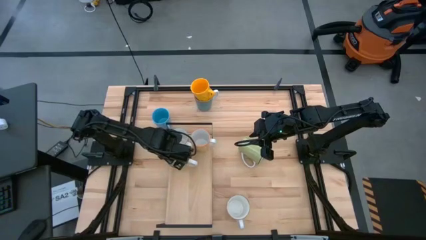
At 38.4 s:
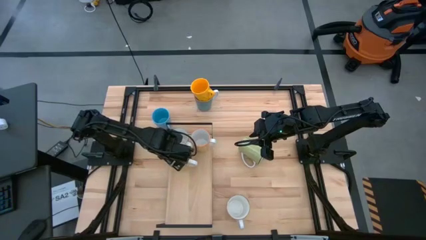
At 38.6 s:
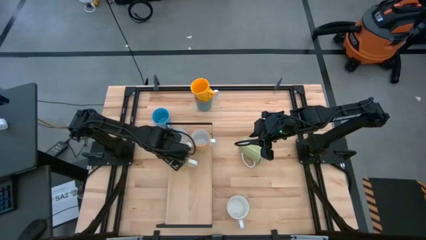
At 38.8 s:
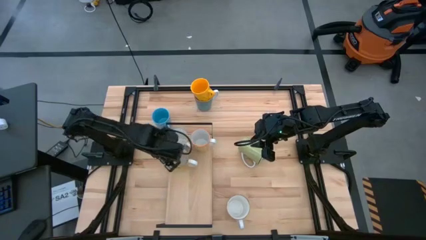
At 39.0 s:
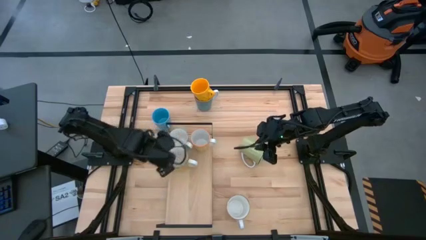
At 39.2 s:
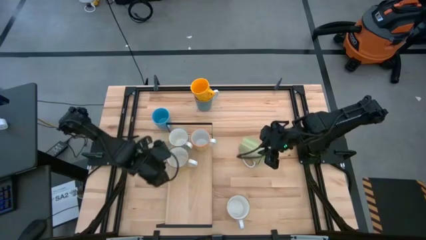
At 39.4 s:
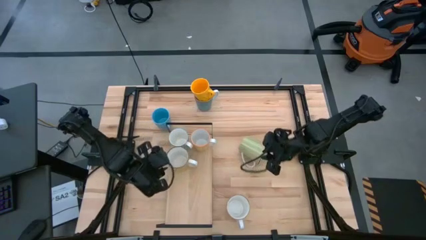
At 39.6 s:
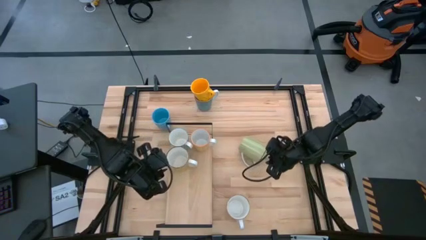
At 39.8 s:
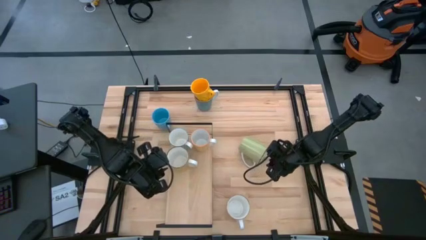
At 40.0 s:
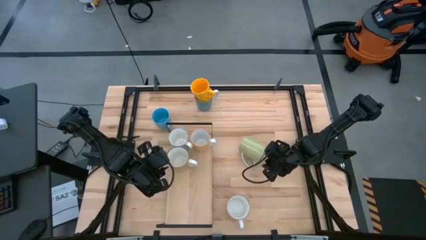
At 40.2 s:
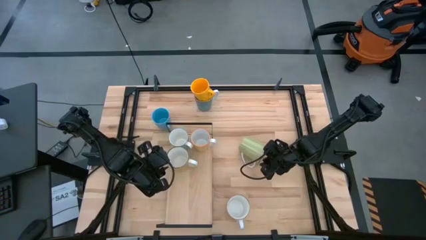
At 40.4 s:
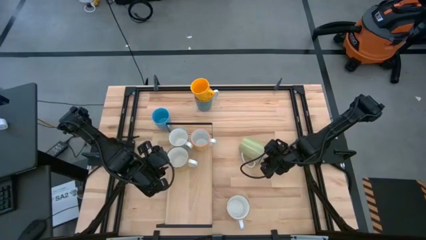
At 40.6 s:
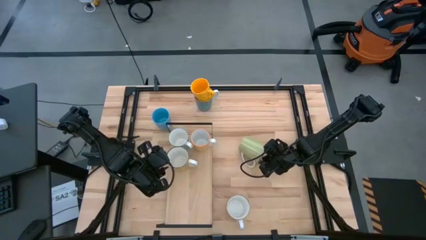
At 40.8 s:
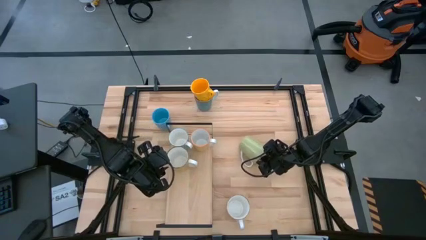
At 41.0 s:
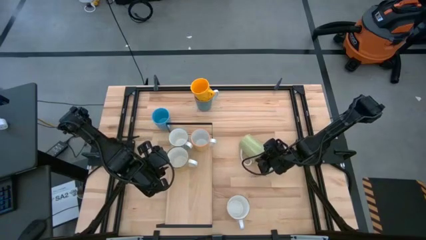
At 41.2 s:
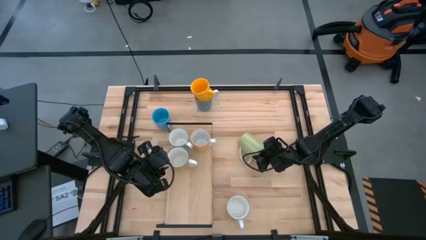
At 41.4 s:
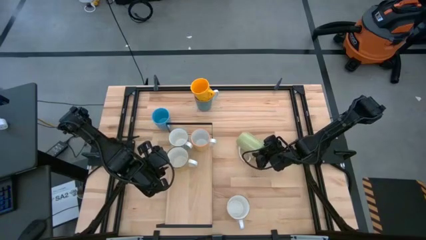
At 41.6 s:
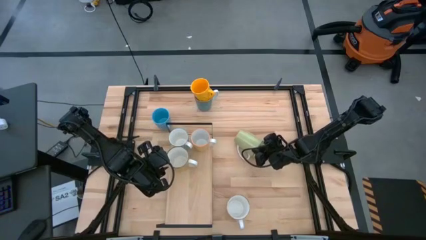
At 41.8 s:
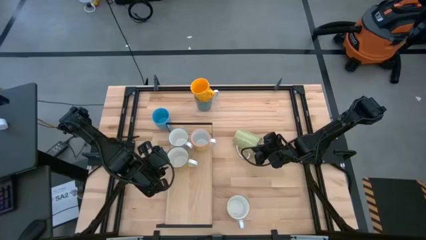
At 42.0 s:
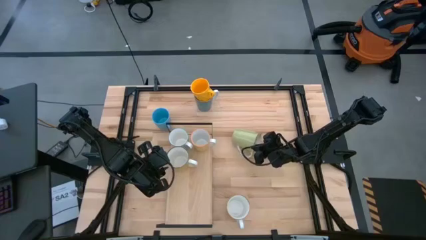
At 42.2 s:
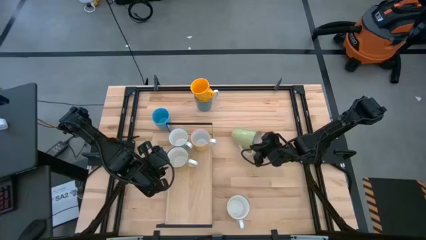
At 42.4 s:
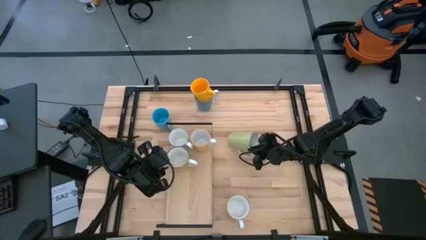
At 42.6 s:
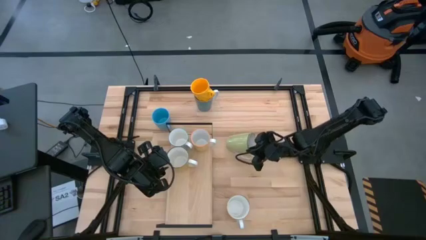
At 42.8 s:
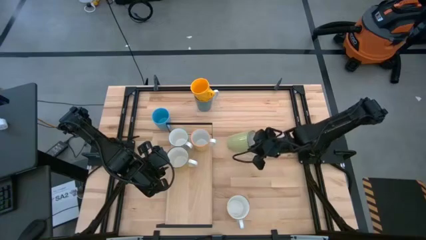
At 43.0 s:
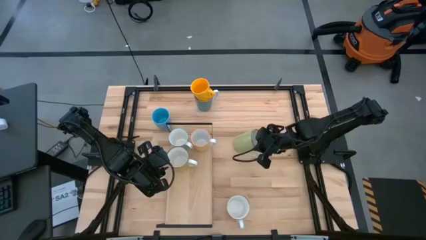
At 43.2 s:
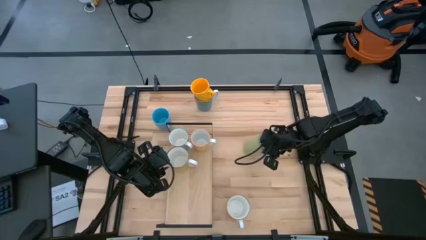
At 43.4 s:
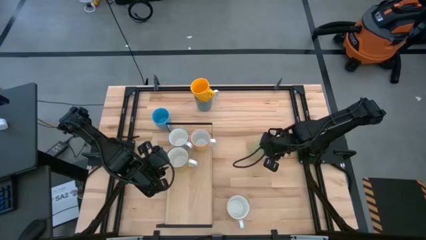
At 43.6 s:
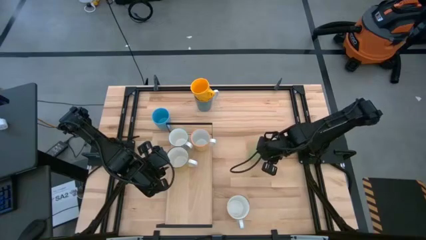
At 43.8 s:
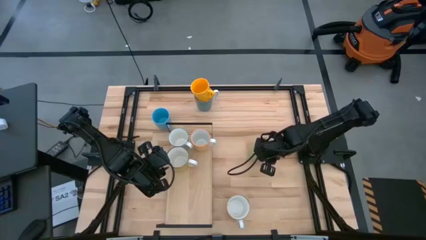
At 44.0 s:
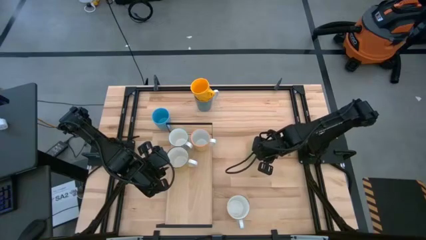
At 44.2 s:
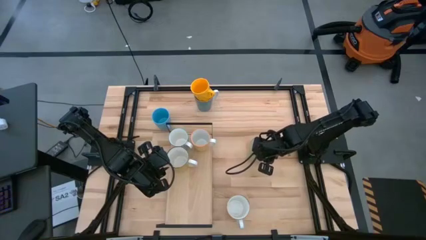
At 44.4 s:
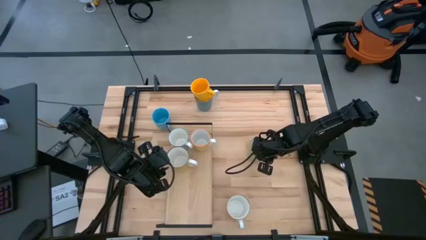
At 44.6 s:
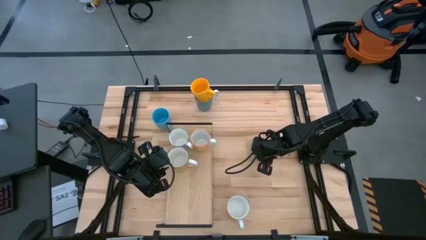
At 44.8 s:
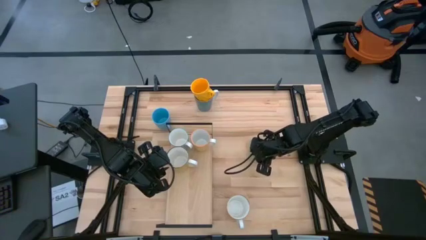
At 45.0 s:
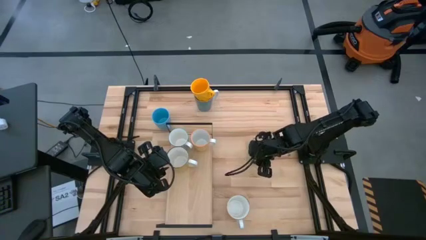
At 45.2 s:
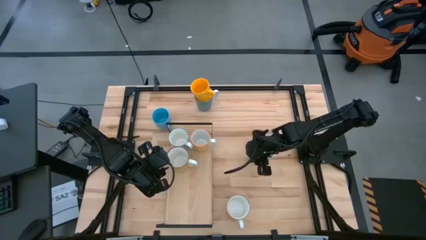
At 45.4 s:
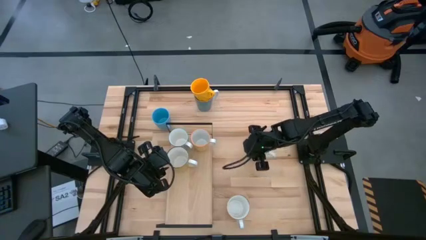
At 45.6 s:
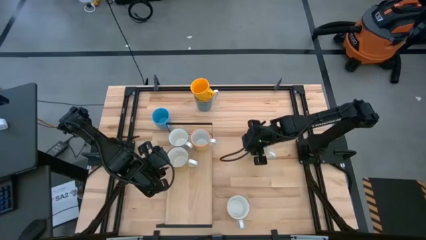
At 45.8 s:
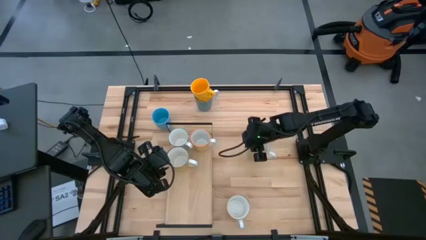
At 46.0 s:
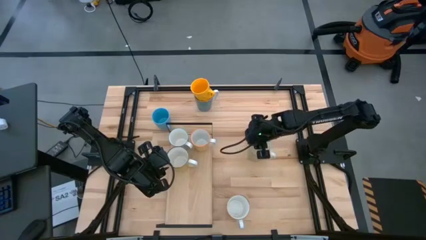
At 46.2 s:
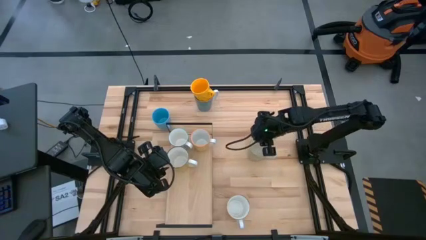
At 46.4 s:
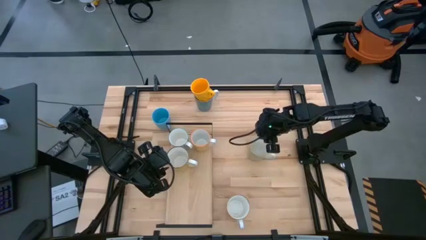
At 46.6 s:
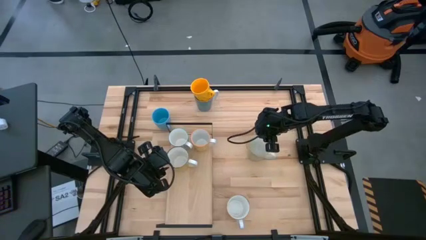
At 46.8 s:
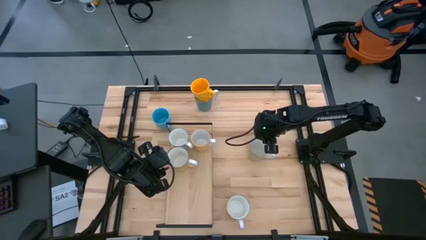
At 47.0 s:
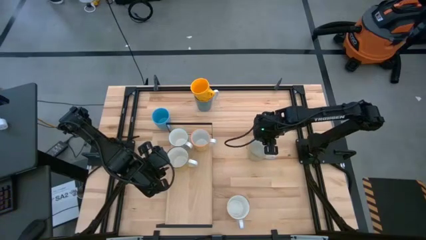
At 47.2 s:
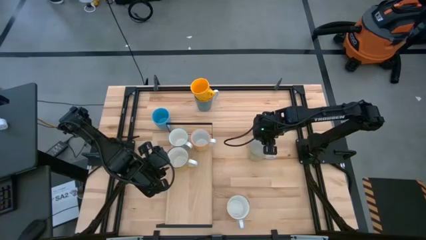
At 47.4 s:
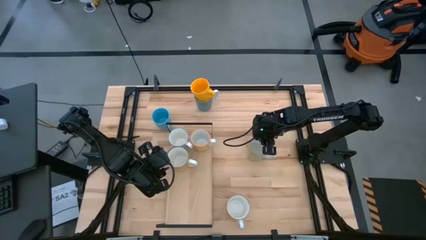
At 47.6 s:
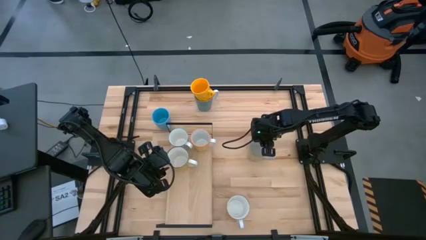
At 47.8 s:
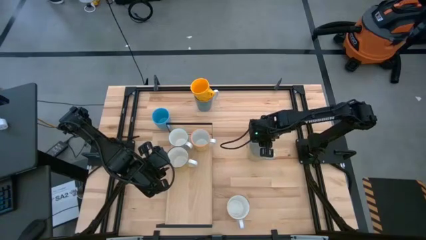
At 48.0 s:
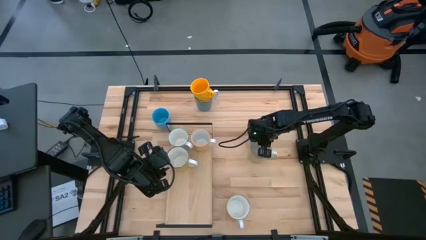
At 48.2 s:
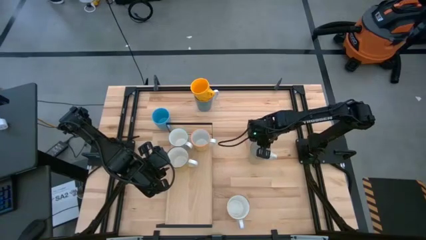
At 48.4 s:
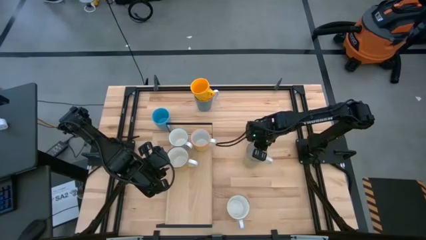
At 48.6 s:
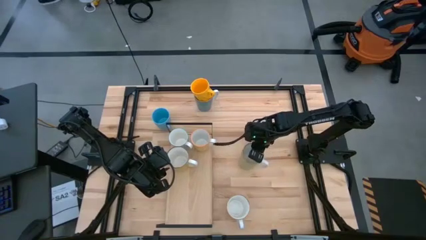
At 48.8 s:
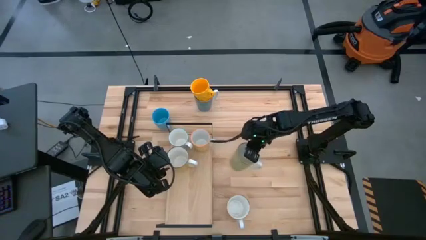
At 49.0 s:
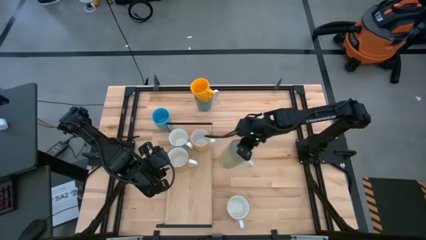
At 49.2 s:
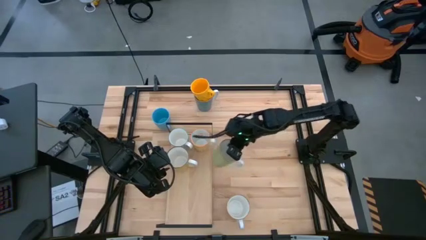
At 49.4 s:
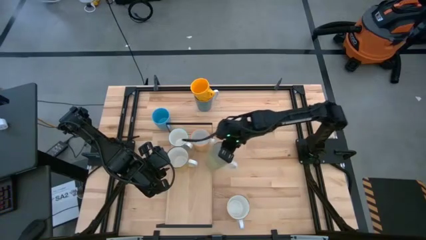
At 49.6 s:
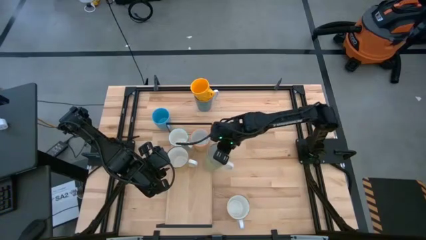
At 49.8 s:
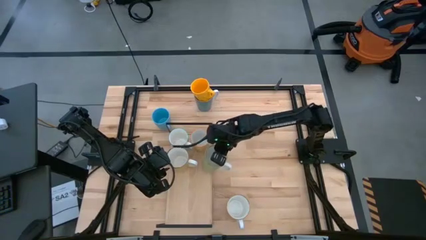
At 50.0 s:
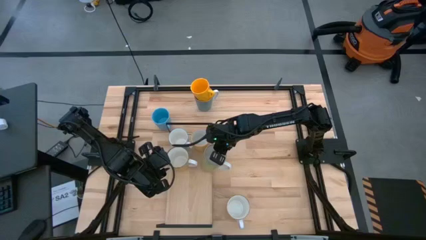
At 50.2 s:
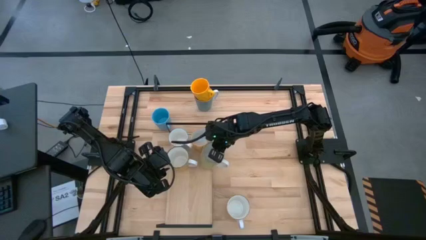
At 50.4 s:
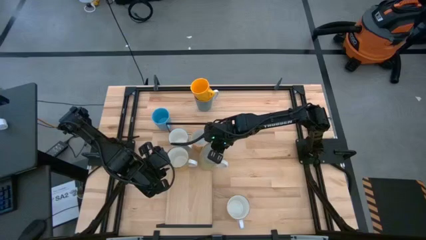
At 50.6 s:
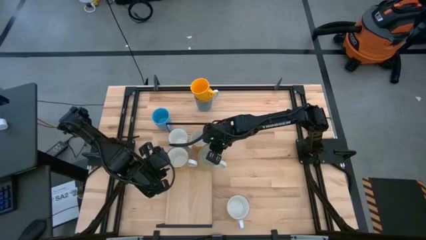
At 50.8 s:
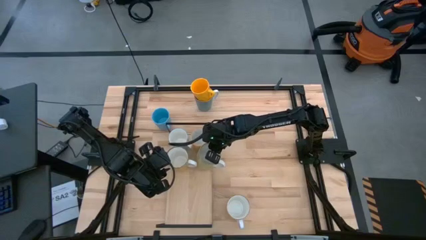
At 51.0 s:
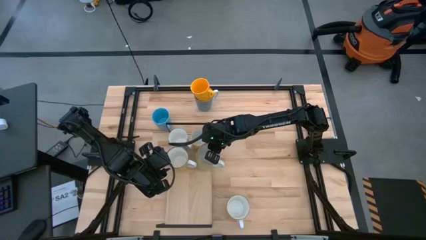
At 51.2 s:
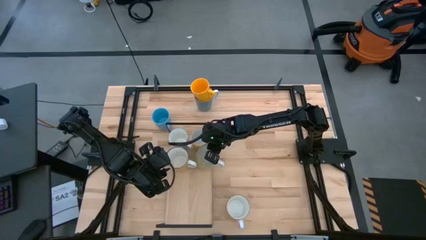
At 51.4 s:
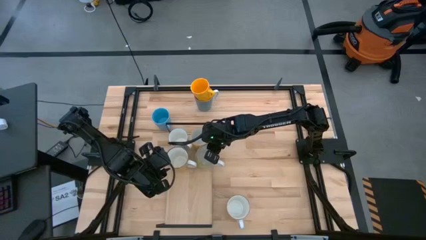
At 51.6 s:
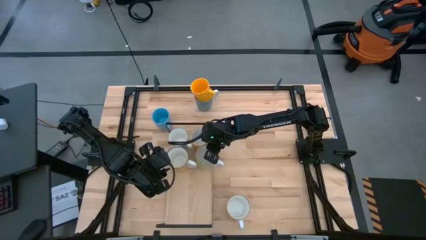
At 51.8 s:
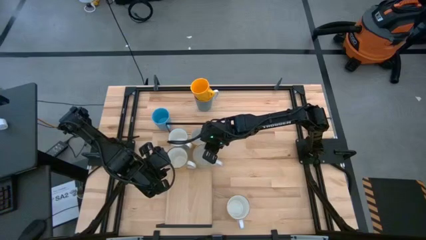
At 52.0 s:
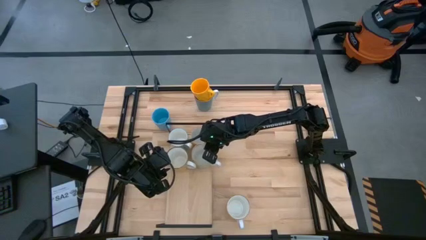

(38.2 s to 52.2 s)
Task: Place coffee mugs
Put the light green mug on the shelf

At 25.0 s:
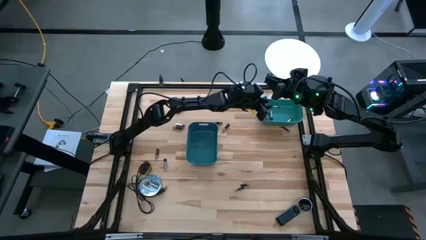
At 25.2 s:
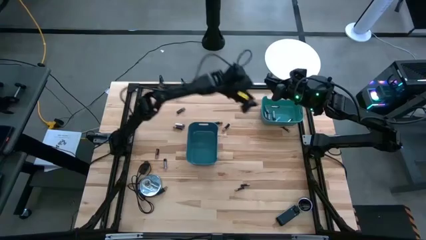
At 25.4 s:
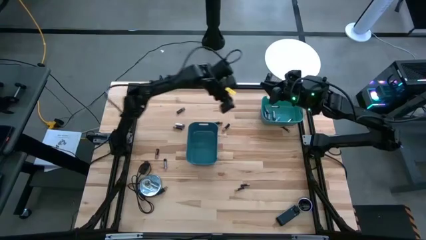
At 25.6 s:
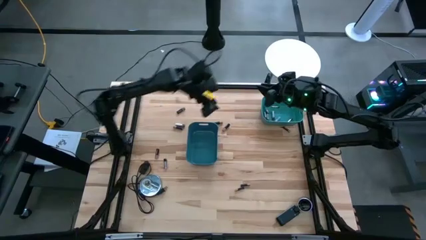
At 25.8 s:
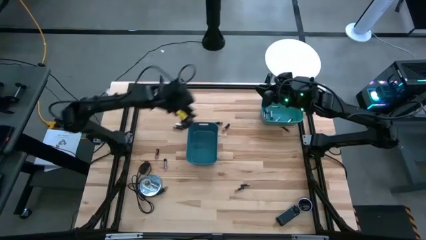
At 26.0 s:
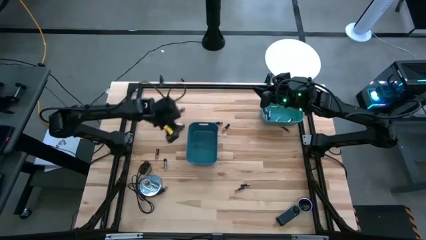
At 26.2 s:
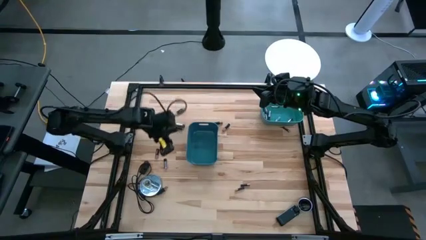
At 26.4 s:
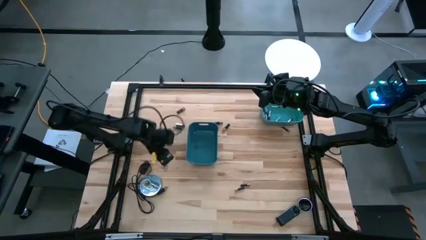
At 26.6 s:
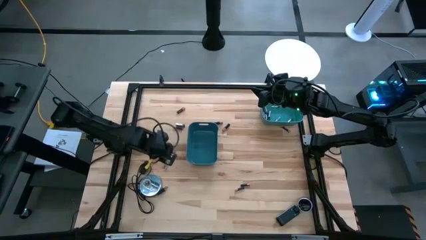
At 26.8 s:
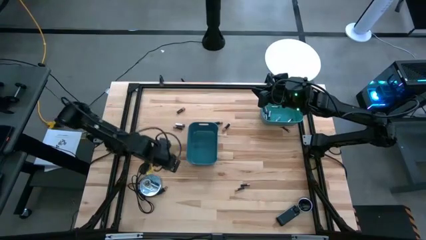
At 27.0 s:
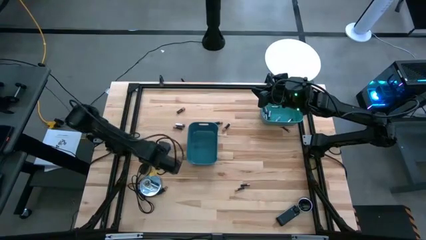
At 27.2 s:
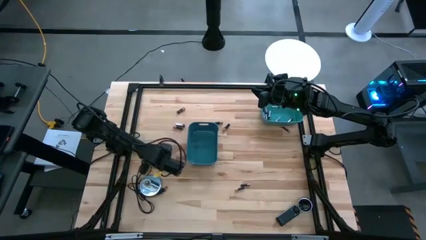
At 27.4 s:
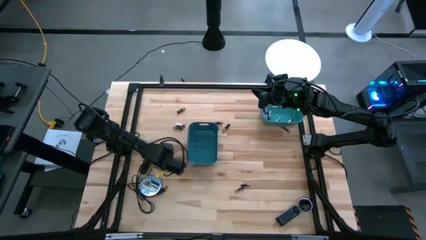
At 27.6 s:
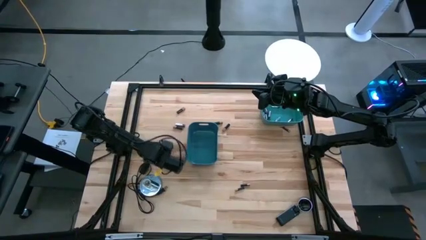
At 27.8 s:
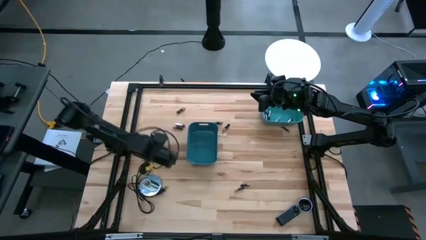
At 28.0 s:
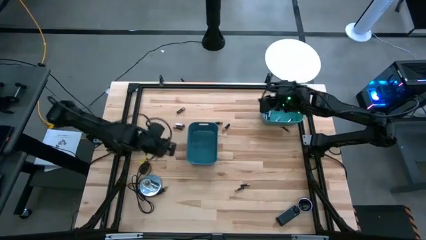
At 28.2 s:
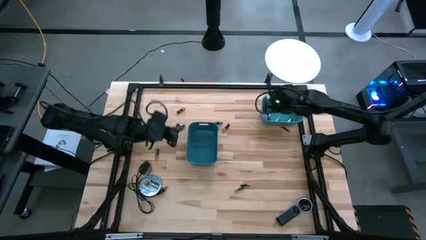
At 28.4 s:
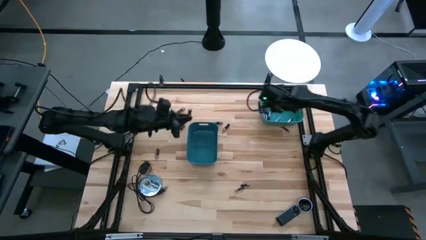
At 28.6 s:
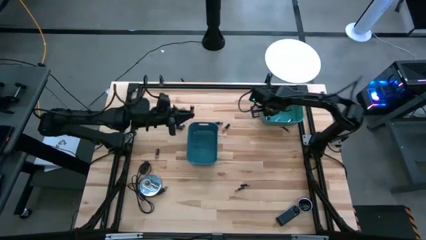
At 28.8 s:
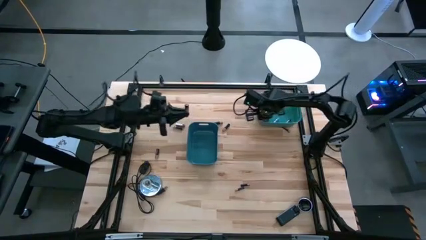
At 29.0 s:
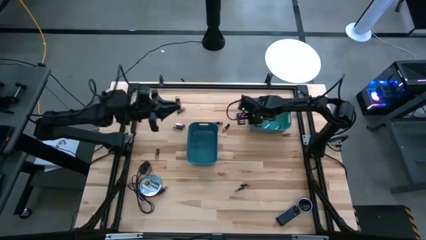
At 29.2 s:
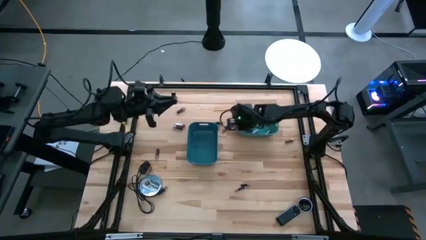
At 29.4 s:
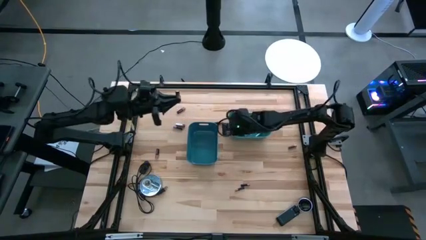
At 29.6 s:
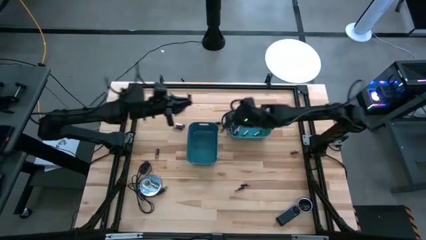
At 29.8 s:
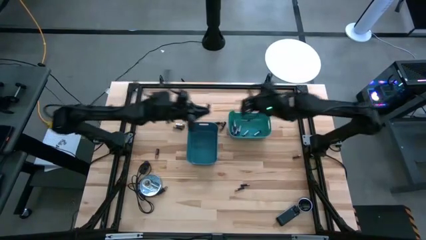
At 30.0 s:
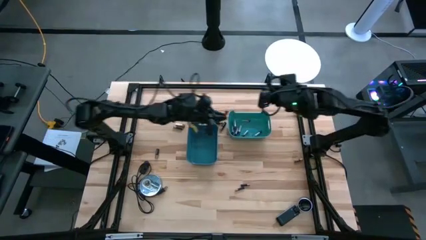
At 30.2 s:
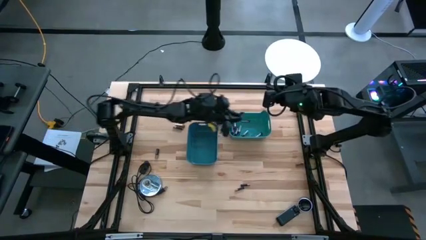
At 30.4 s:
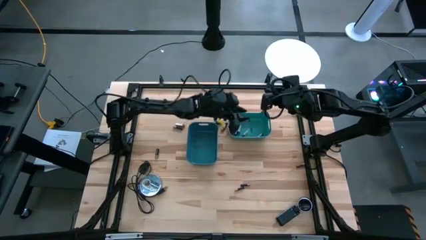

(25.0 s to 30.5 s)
Task: Sort batteries
Put the silver battery into the green bin
